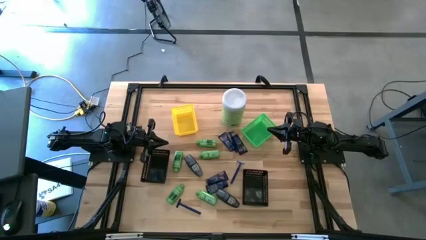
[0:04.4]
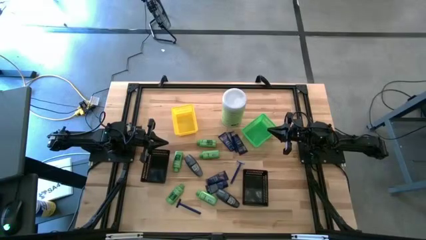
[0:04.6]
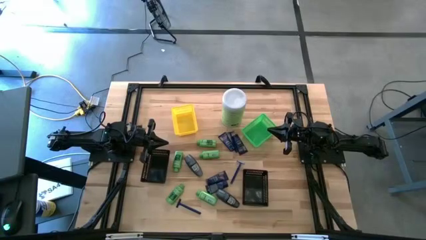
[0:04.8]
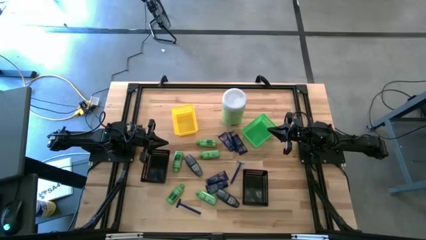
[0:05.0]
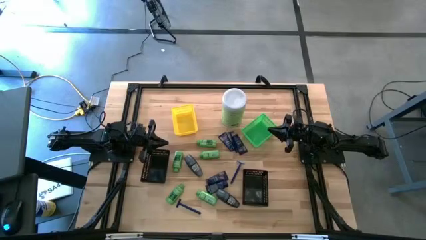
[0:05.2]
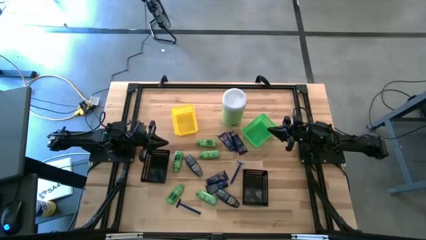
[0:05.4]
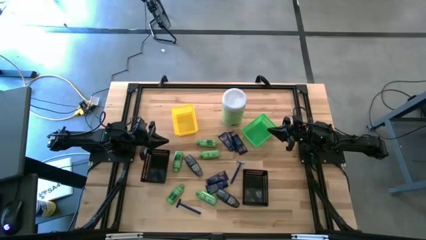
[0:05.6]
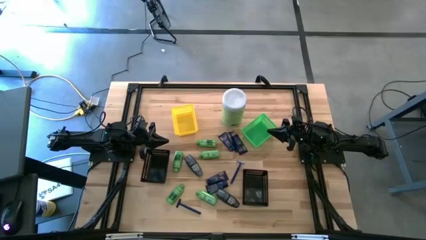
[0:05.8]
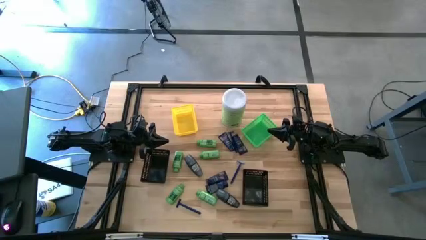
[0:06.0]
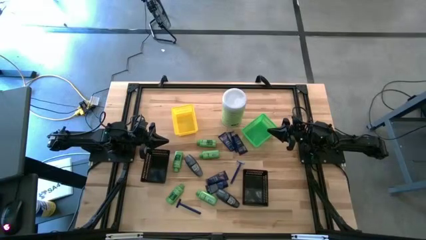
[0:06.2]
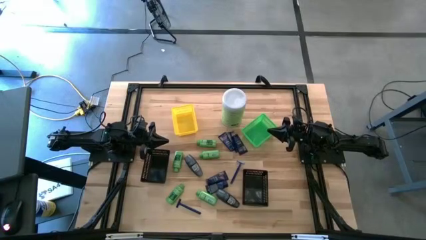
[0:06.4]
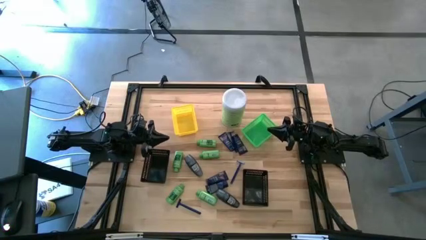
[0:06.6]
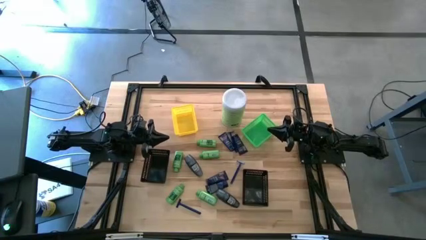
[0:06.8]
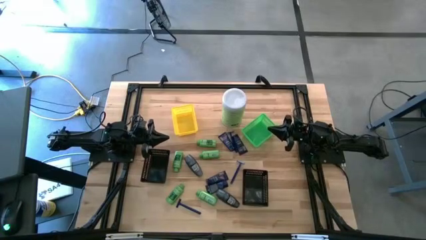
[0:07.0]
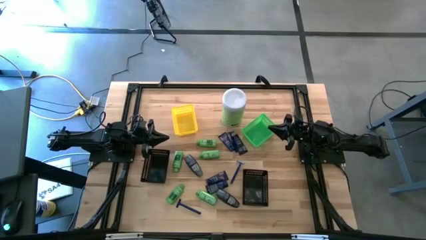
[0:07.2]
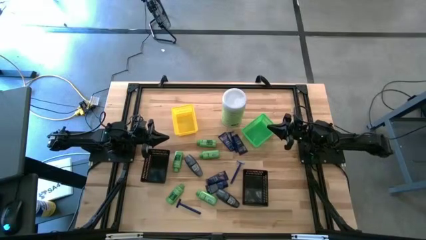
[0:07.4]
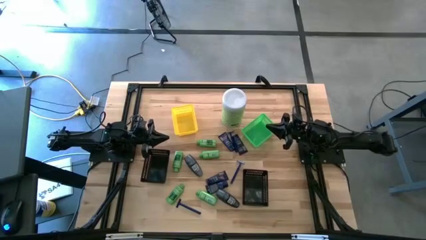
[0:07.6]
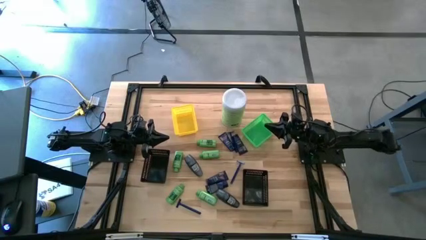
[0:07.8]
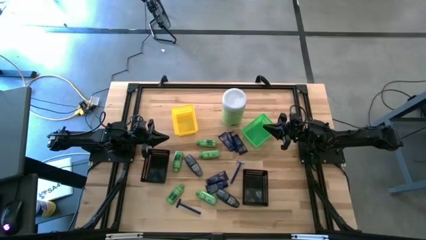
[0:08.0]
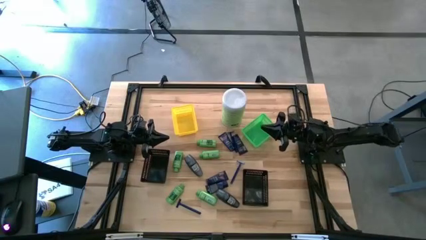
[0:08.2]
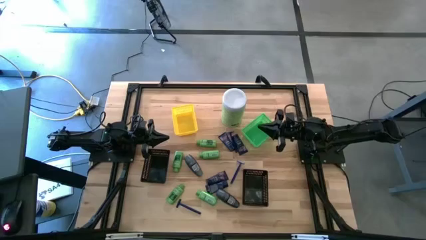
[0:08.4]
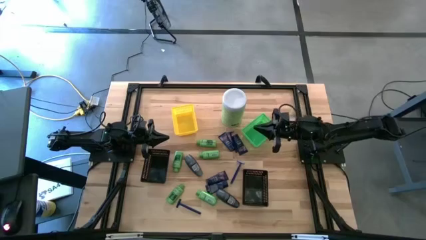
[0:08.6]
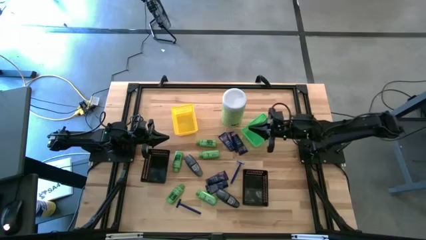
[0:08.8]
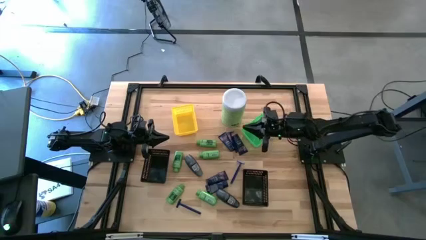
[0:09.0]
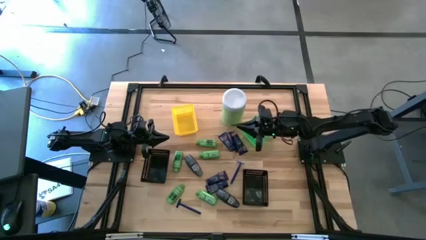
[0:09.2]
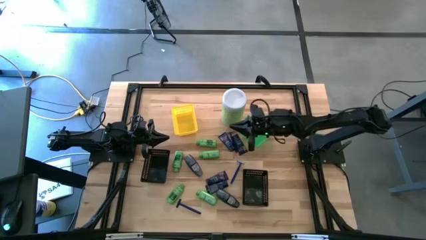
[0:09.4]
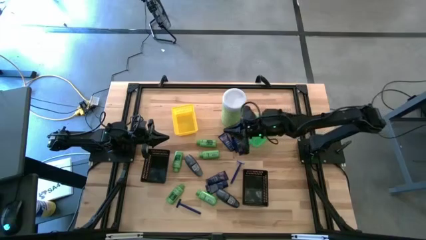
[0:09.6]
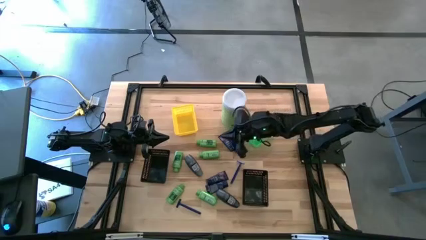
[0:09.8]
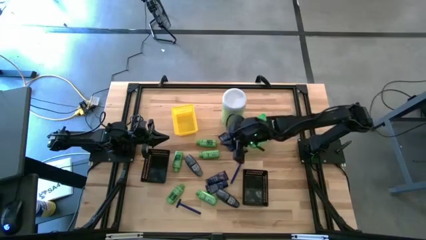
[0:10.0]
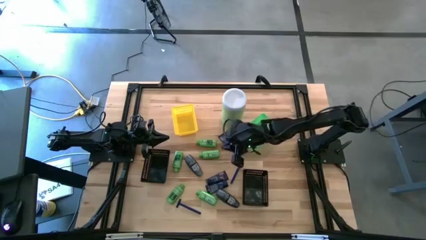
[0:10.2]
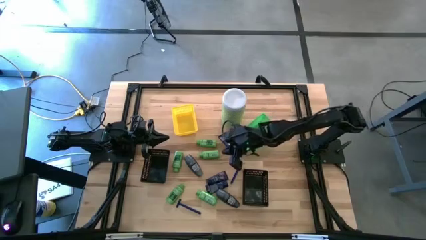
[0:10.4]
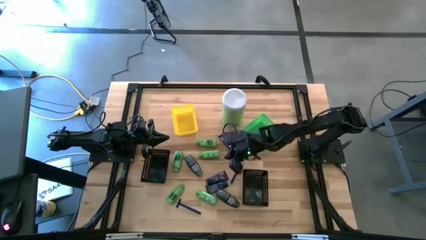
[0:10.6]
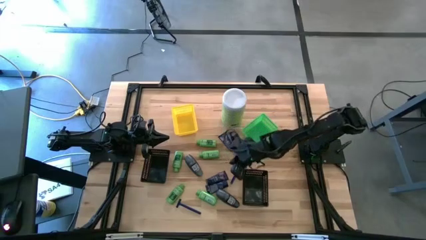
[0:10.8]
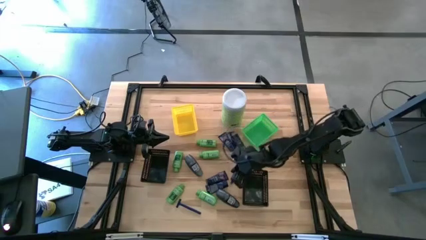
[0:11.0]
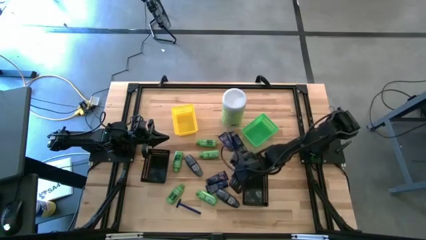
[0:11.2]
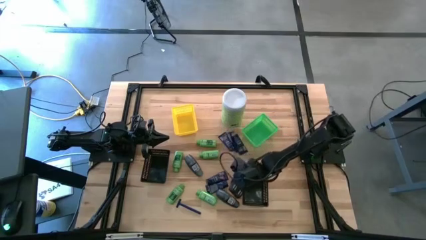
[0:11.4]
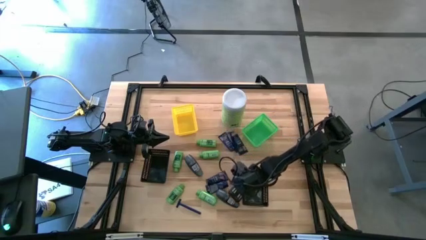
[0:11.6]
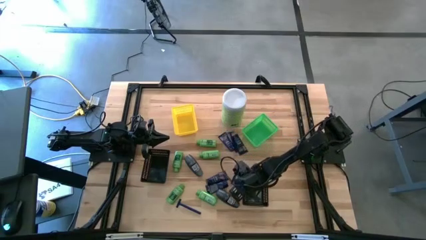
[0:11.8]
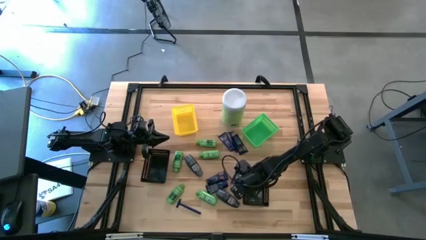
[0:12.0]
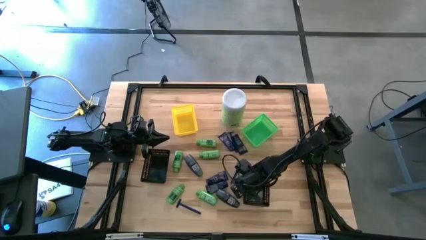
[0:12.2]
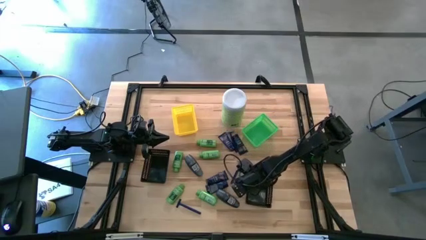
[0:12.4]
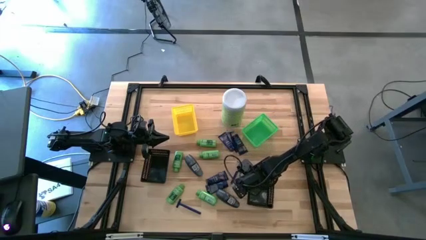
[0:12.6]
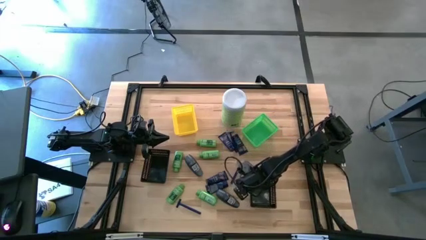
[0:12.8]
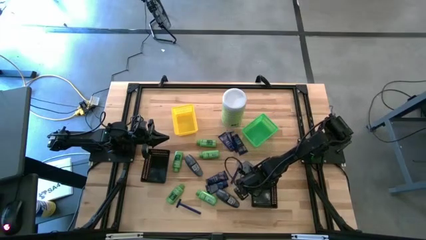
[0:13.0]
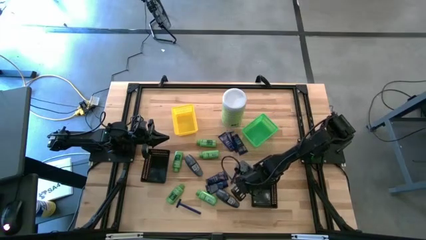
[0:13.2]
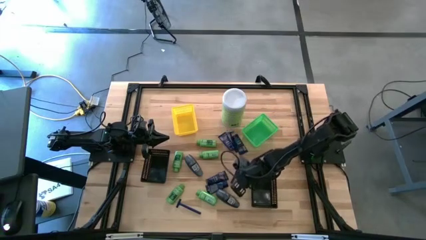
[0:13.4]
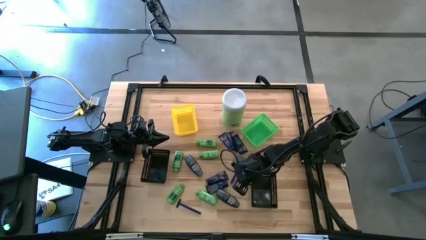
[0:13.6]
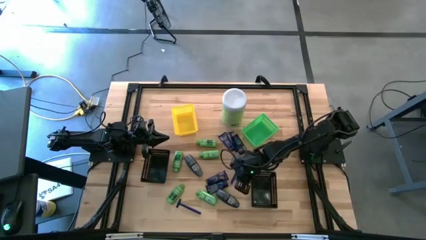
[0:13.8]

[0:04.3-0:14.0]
Task: Pick & Place Travel size toiletries
Put the middle blue razor into the right black bin

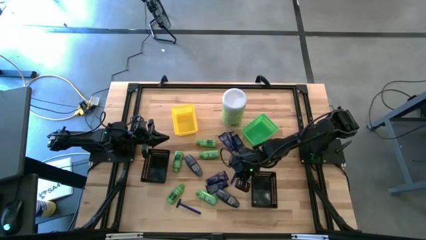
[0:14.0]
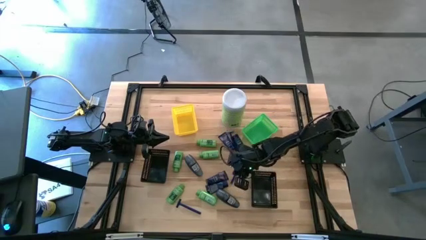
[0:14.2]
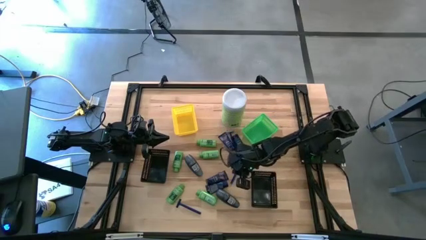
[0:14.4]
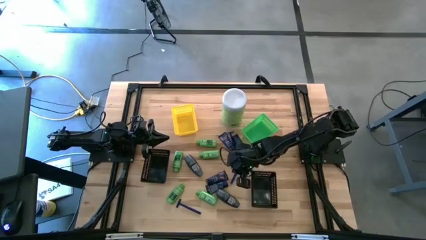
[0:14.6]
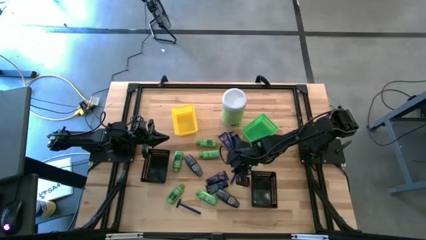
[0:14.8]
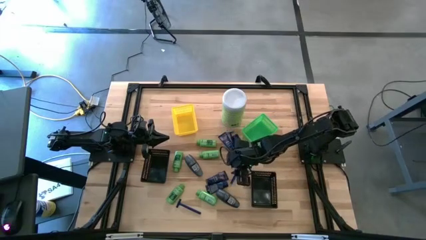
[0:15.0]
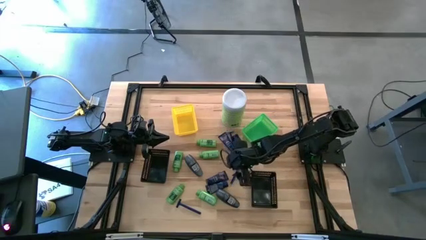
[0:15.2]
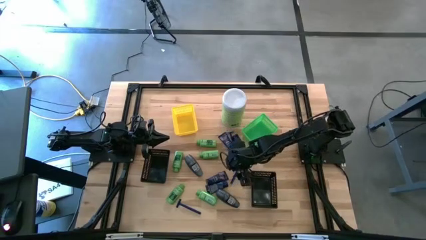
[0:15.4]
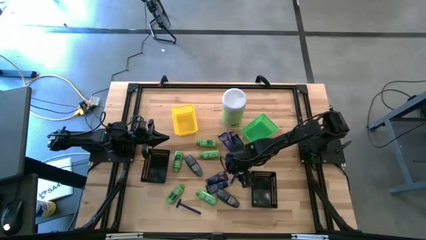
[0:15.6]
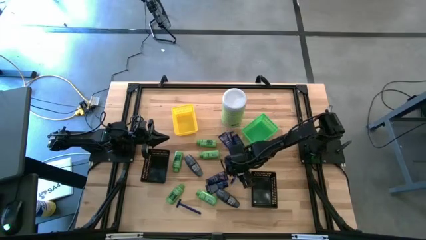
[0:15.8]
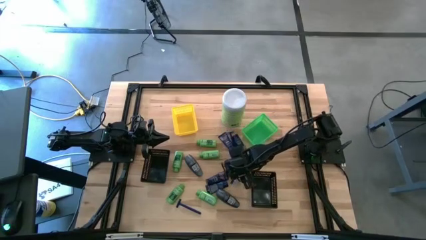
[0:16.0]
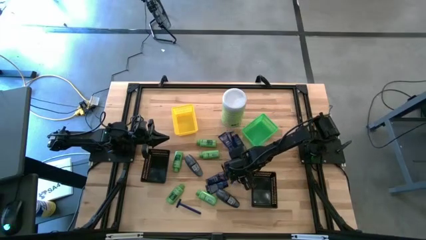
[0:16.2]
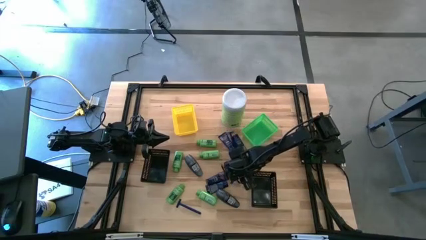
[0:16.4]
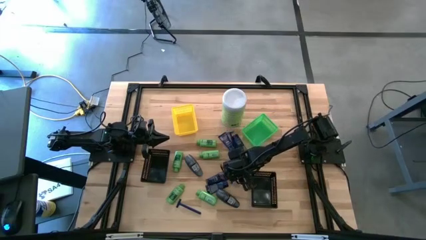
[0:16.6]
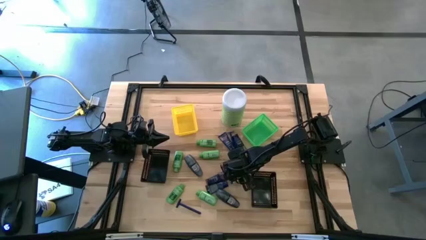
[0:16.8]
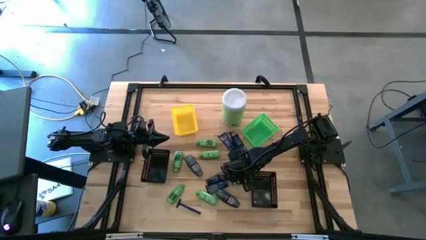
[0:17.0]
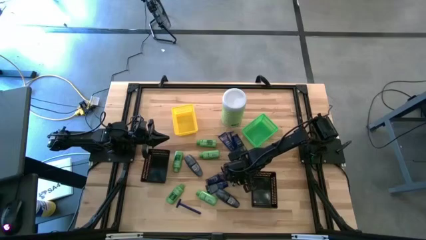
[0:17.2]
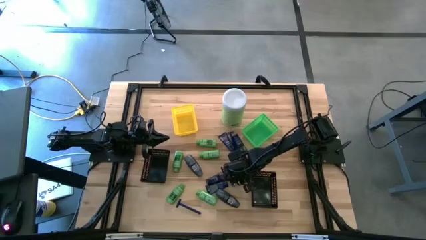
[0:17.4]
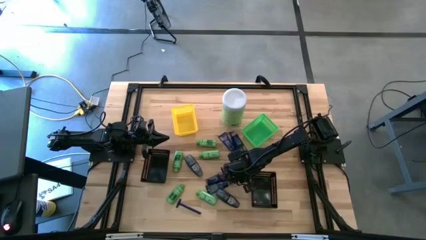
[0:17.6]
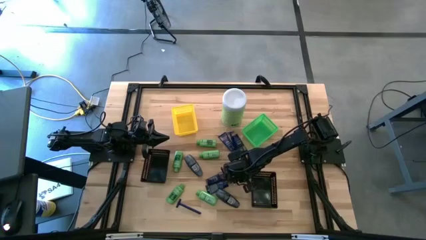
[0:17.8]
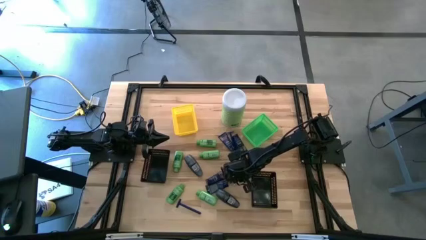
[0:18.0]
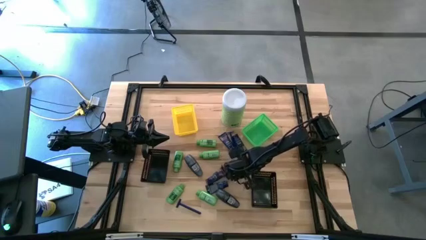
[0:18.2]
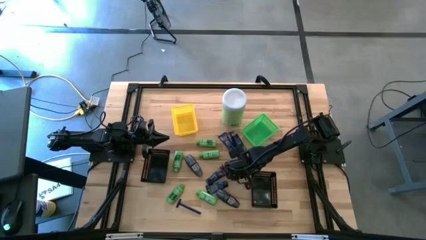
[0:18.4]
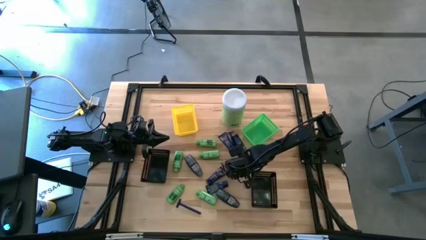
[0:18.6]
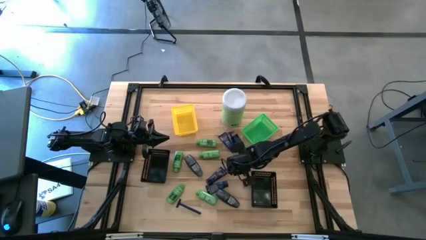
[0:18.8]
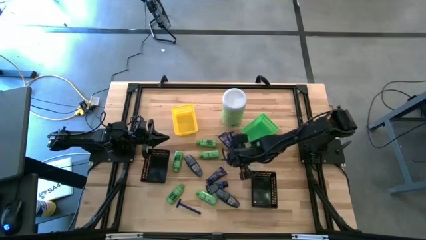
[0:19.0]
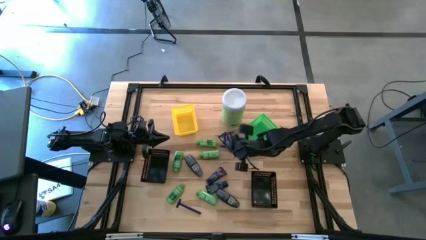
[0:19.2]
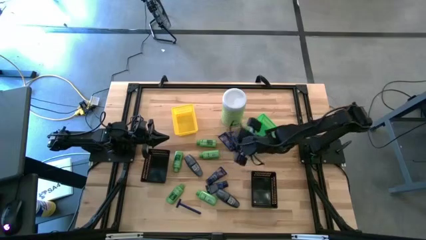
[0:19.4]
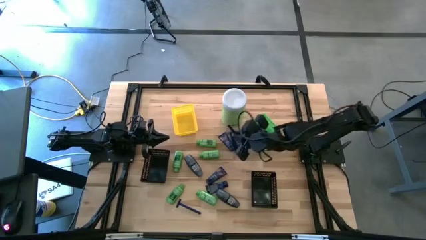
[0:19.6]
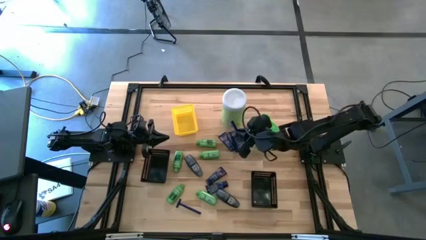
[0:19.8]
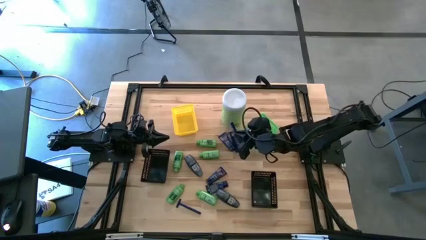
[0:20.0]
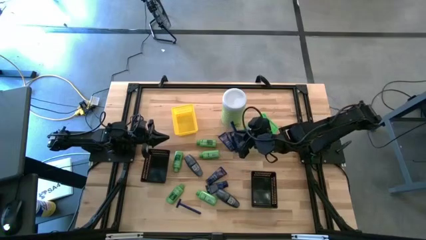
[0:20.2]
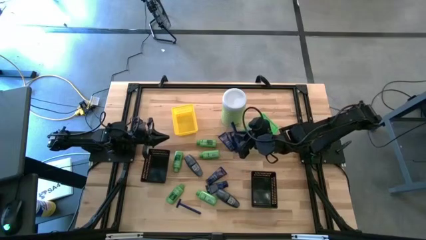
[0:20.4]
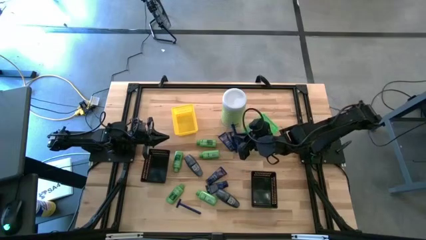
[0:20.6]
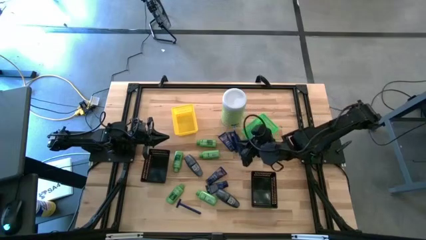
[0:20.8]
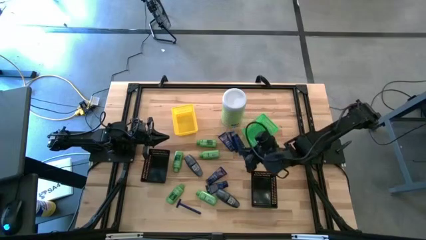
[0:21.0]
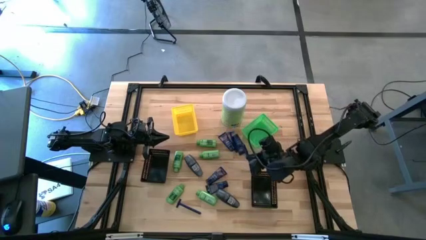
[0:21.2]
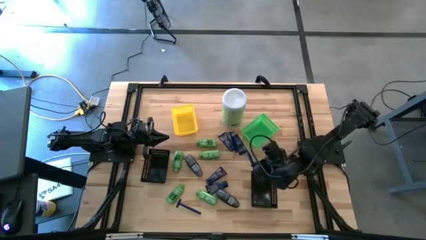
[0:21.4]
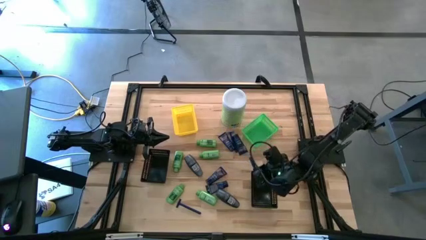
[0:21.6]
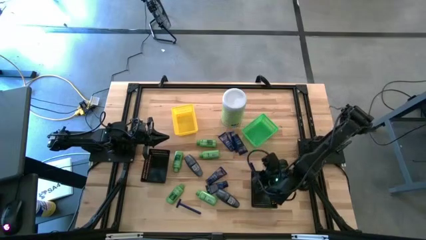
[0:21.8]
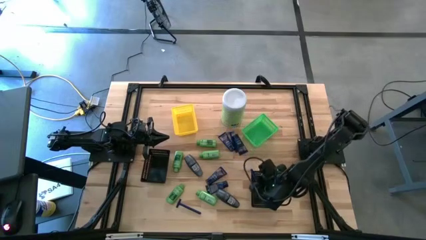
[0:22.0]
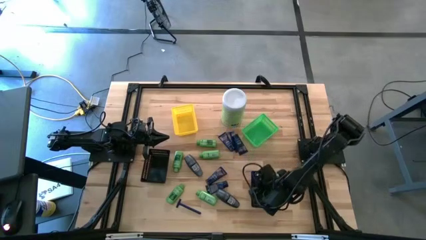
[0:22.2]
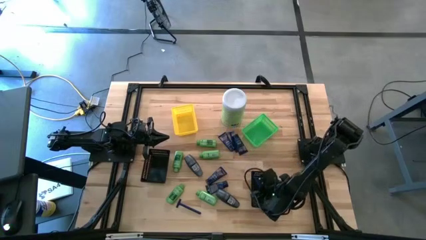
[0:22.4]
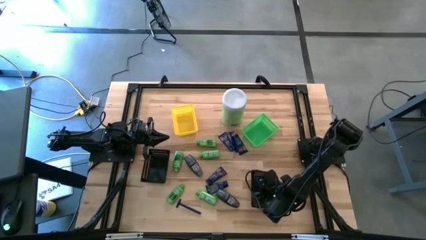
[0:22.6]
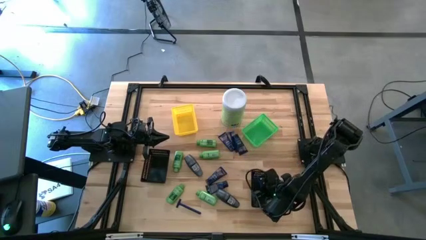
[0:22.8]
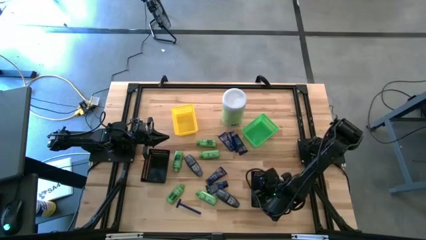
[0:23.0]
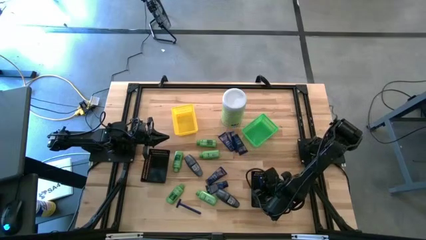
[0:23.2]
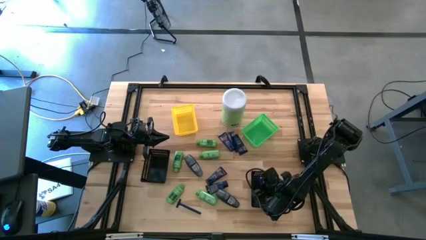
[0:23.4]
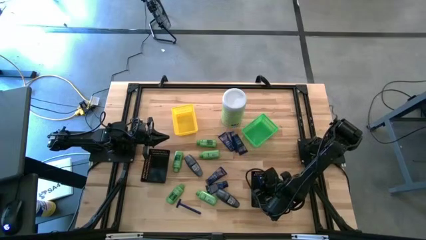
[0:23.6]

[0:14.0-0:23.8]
Put the middle blue razor into the right black bin
